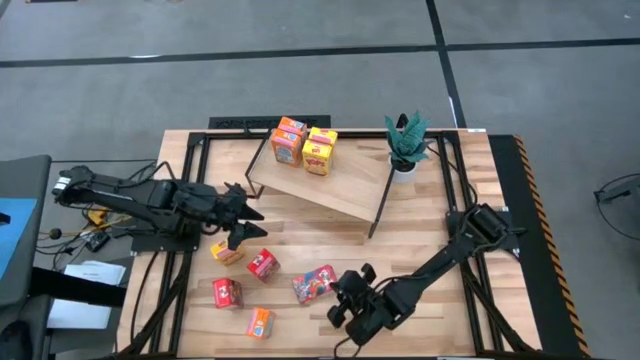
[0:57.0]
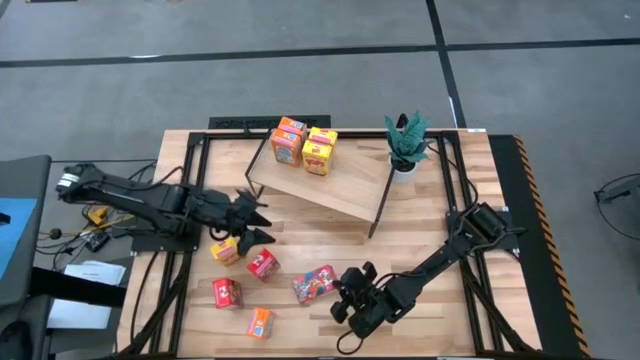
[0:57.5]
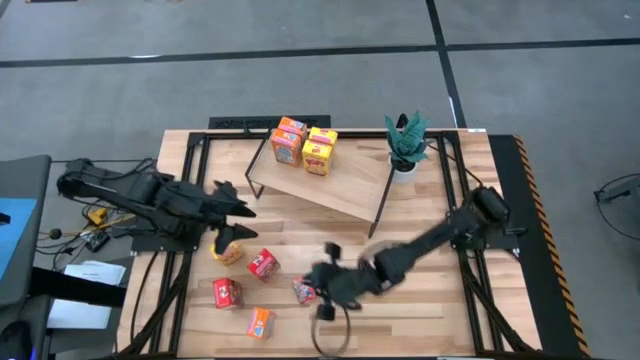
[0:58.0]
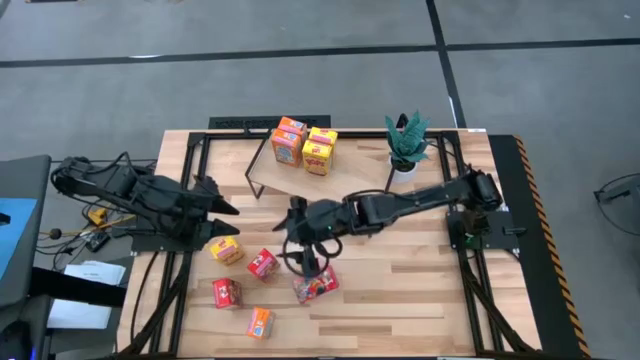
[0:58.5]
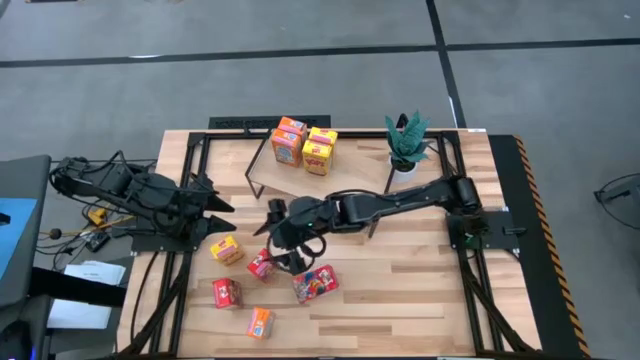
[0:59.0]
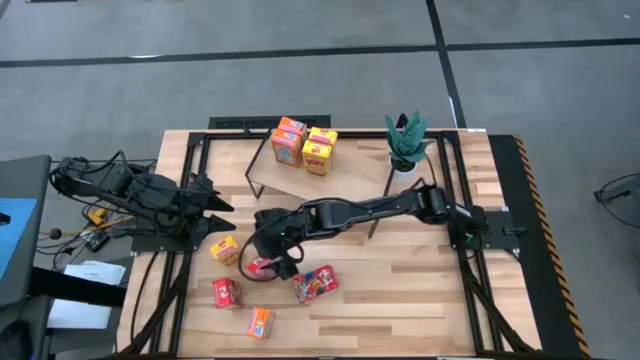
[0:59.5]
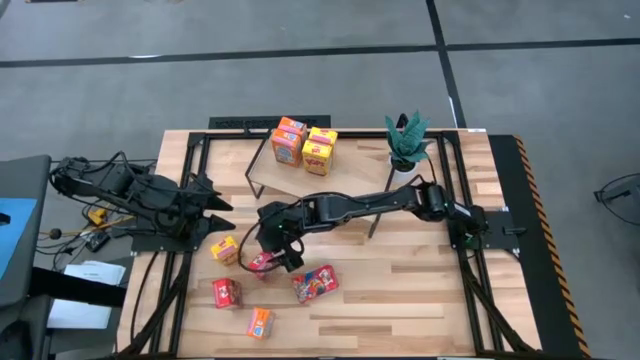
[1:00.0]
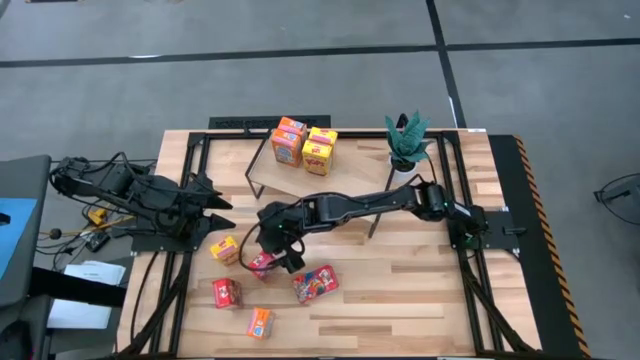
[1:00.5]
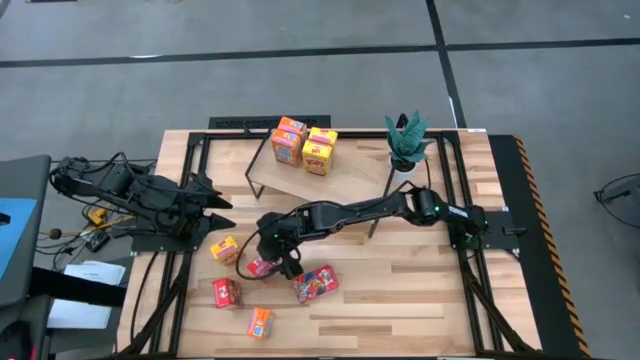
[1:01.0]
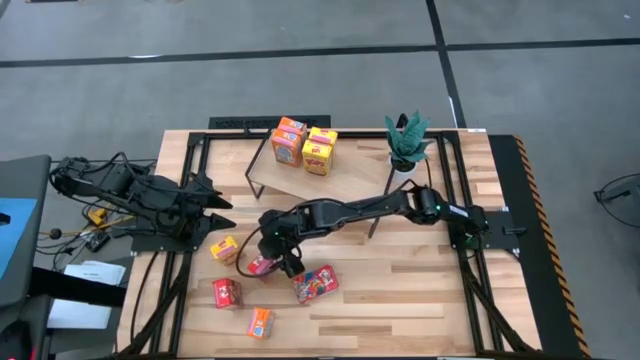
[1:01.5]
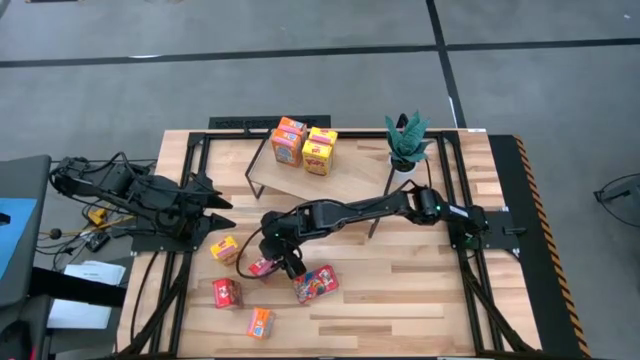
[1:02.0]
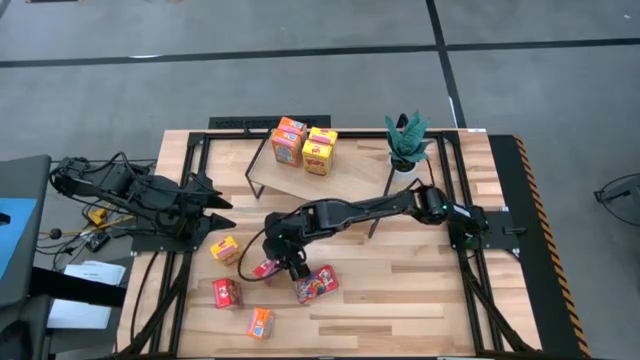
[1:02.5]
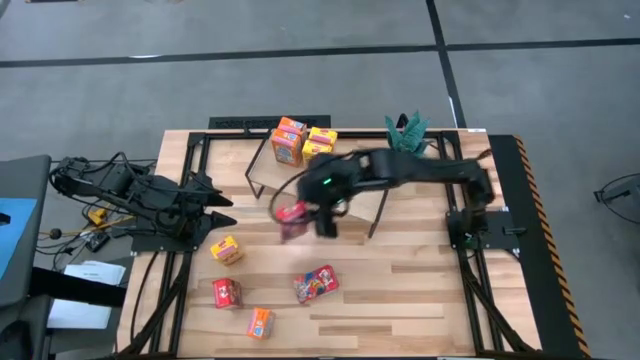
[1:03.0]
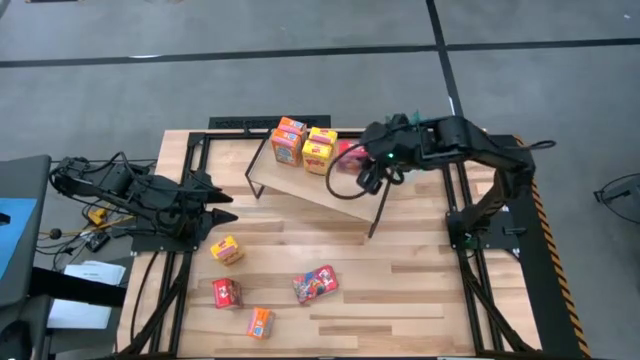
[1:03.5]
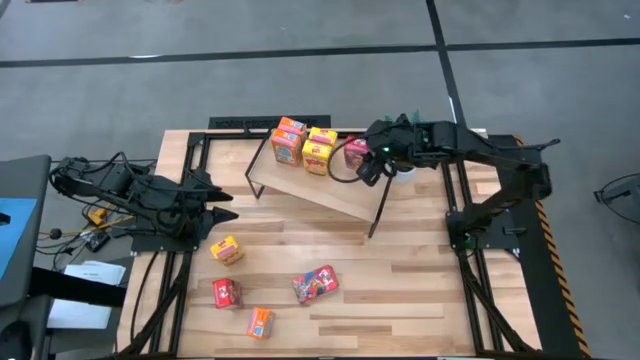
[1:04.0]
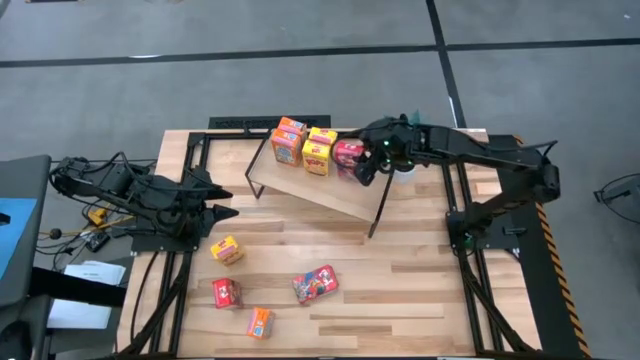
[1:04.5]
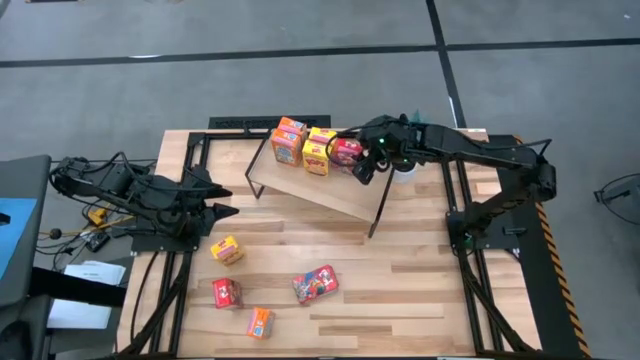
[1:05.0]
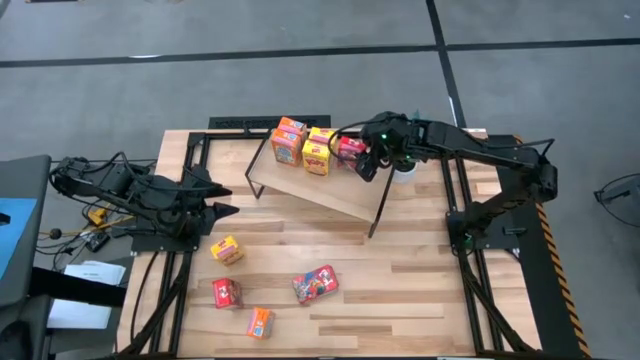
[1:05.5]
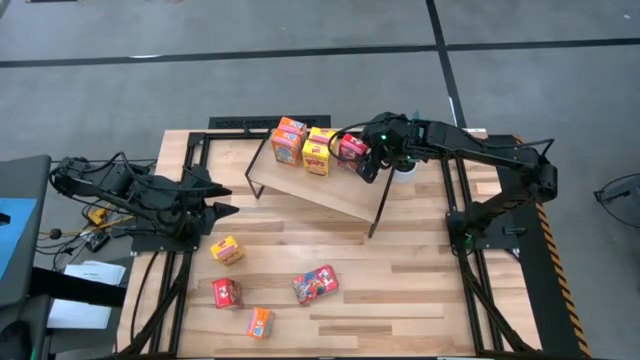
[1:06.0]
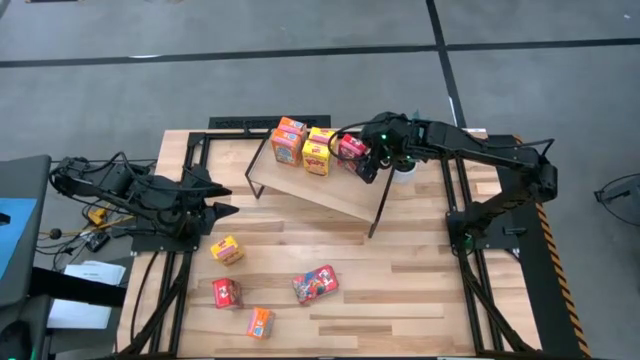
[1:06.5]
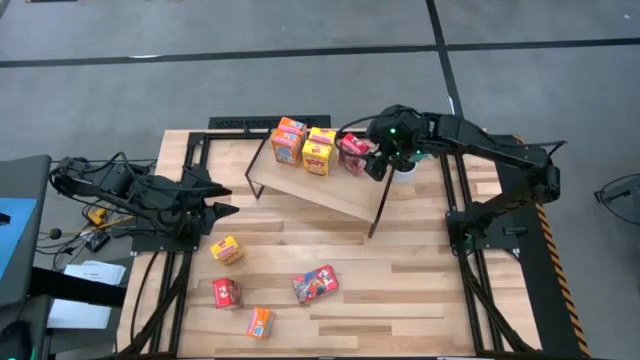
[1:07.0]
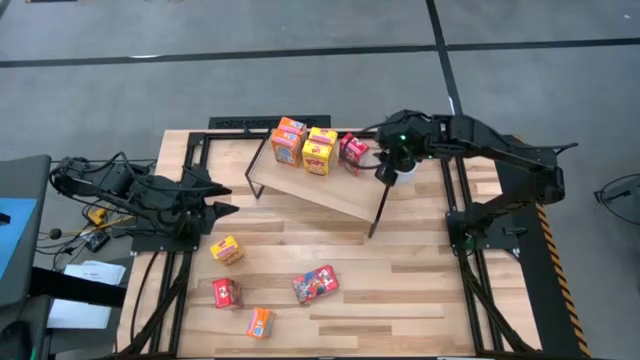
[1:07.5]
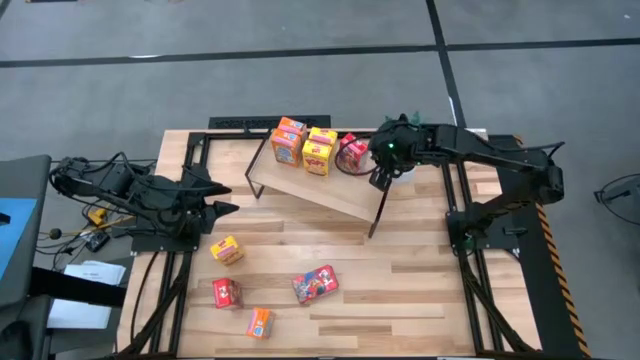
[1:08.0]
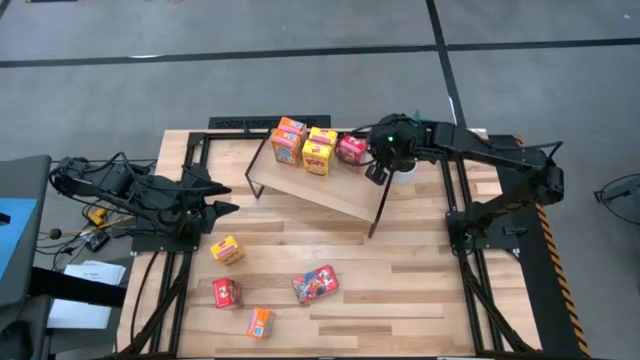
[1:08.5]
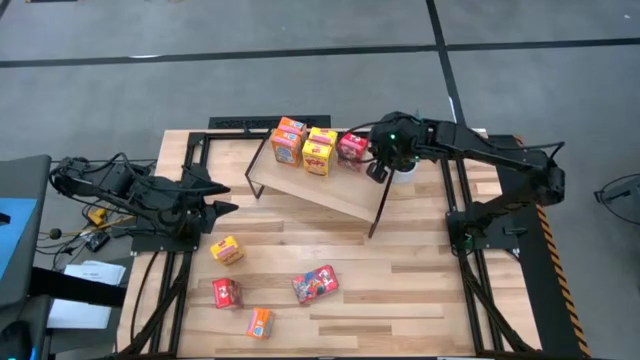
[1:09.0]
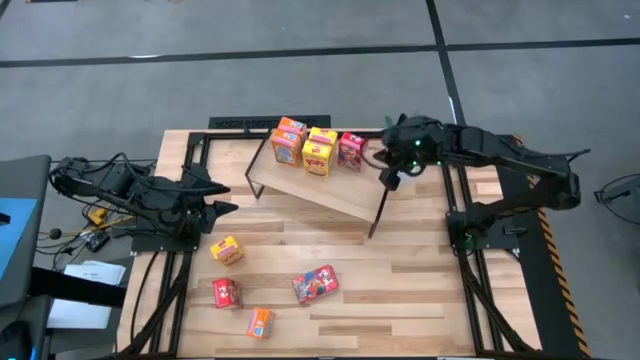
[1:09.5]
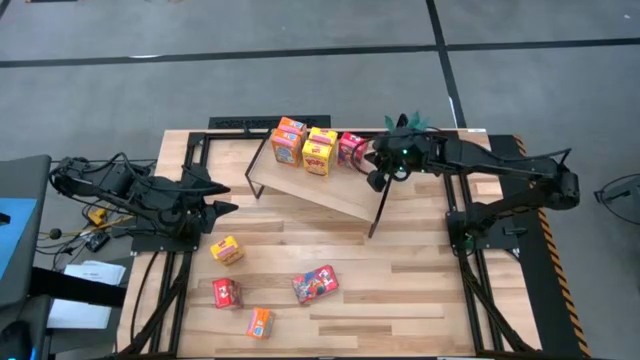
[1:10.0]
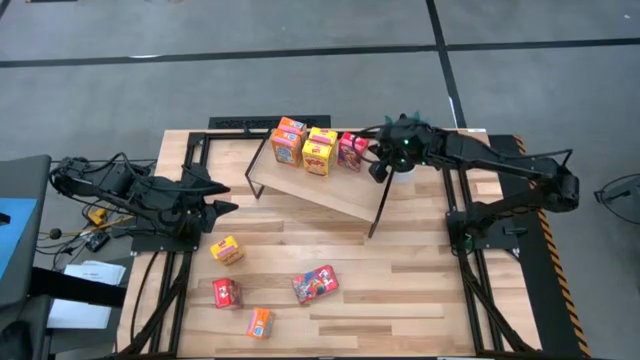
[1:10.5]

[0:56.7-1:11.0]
Task: Stack cereal on shelf
Put the middle red cereal box on the shelf

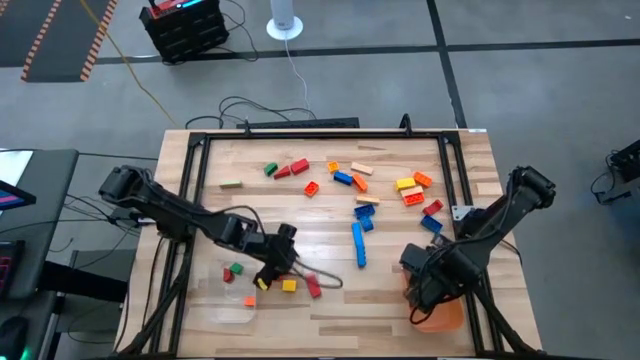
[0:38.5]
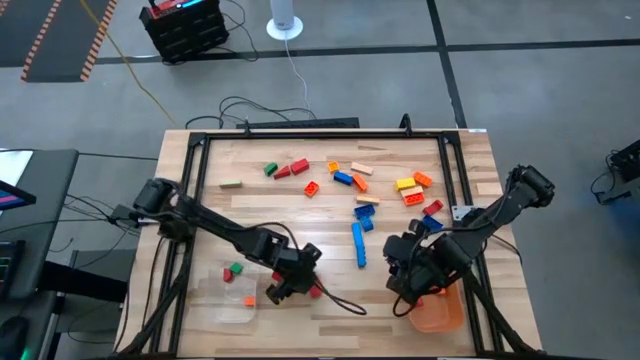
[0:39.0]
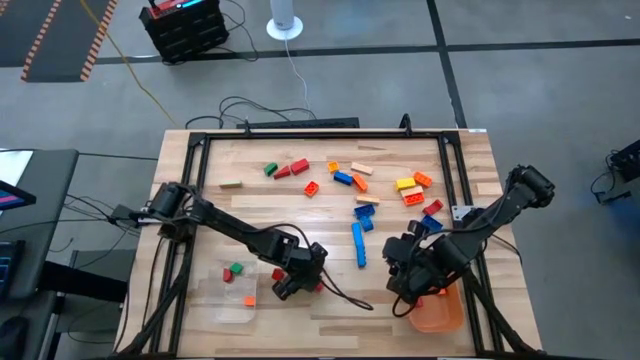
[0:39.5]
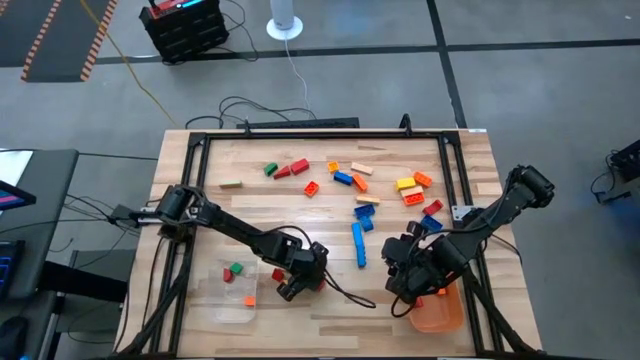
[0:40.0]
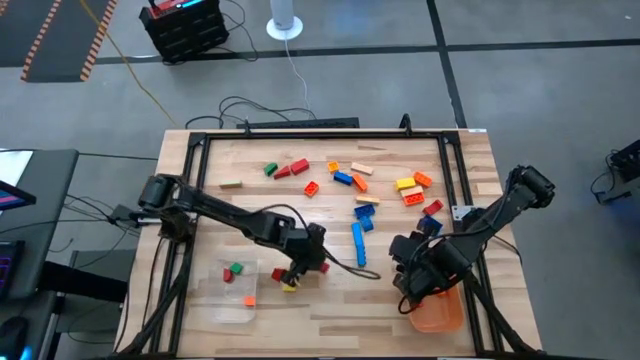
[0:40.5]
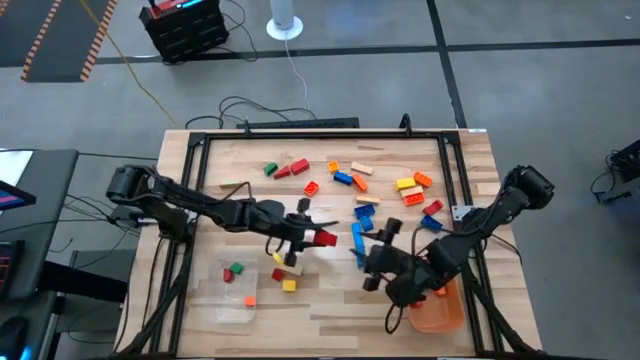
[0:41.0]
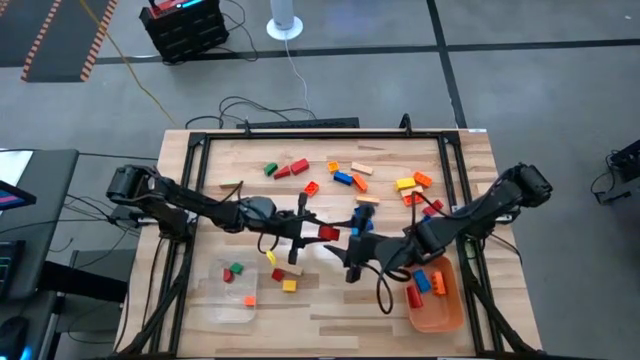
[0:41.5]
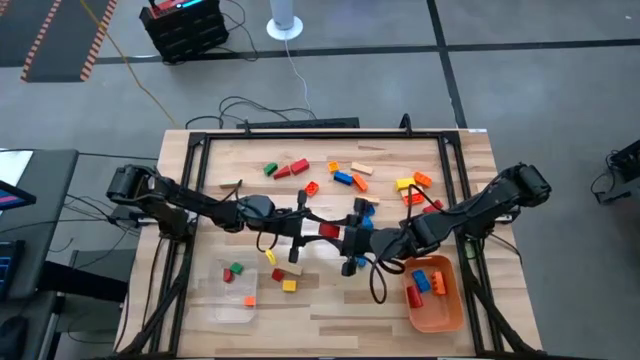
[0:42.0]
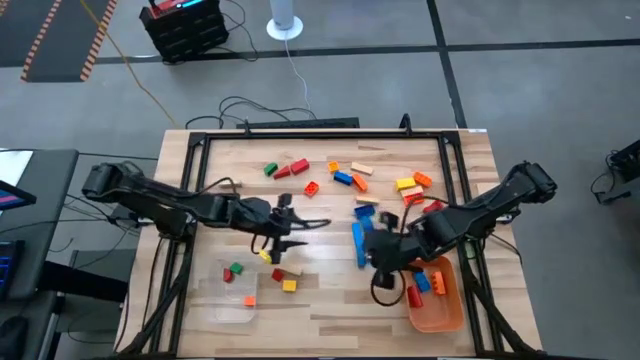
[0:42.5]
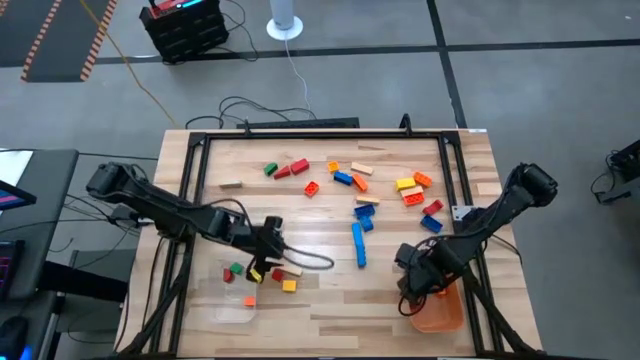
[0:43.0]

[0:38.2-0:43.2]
Task: Sort blocks by size
Put the large red block into the orange bin

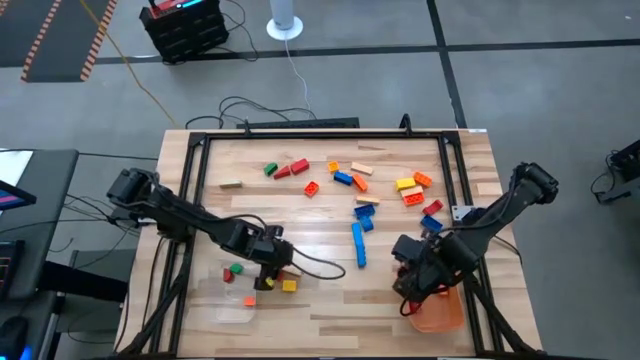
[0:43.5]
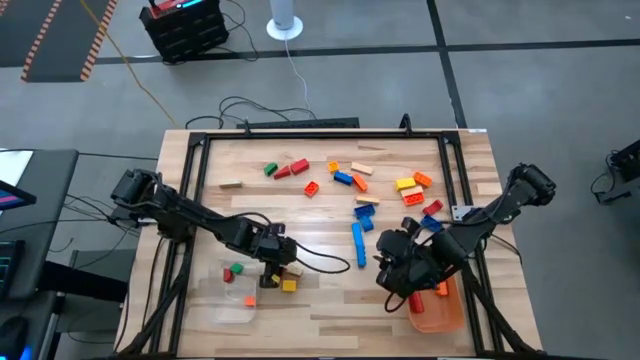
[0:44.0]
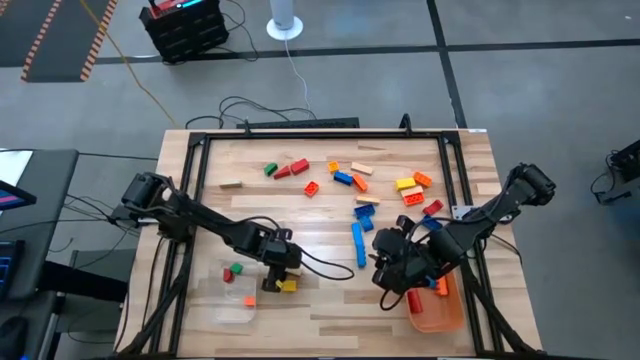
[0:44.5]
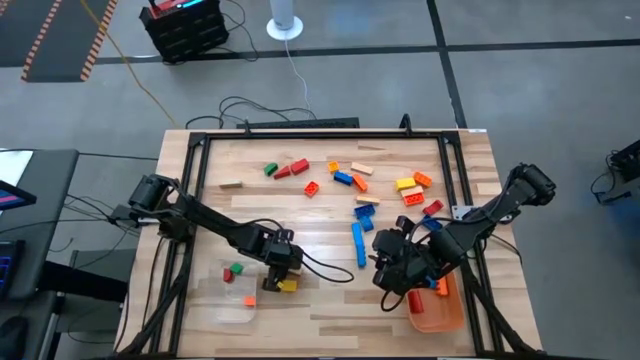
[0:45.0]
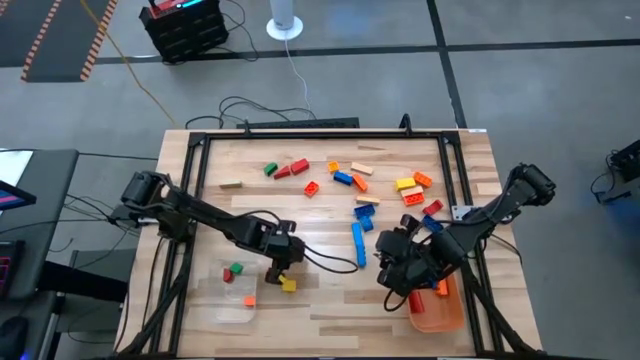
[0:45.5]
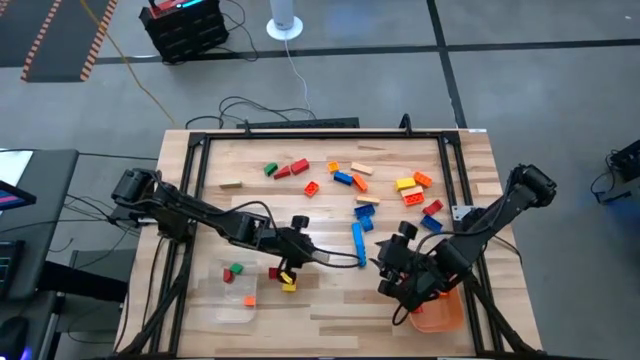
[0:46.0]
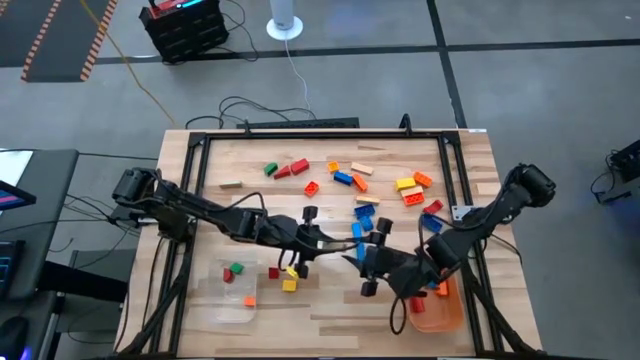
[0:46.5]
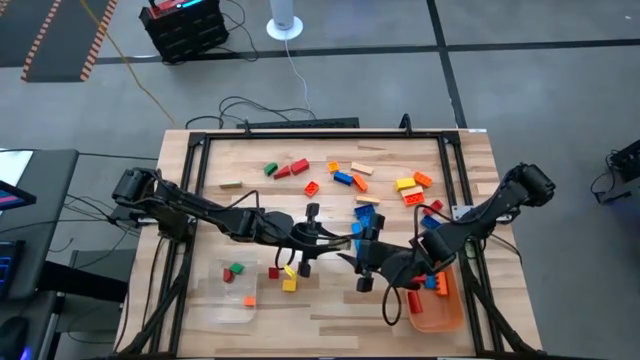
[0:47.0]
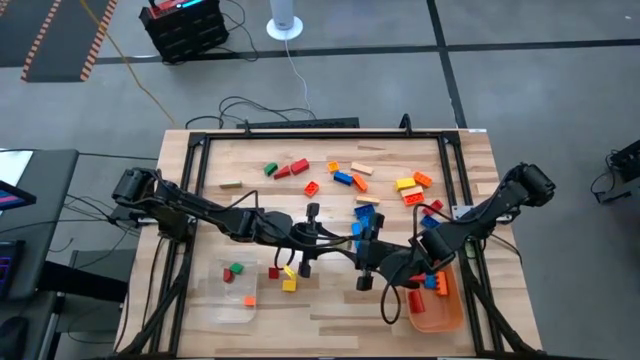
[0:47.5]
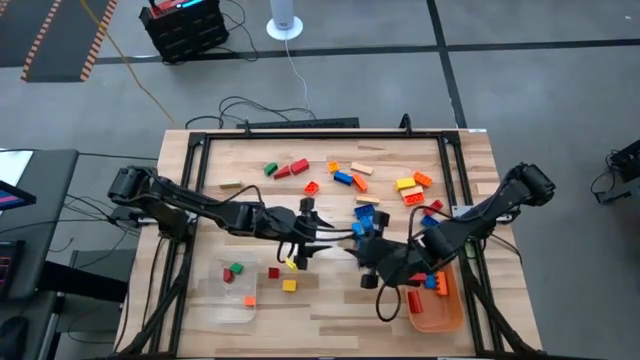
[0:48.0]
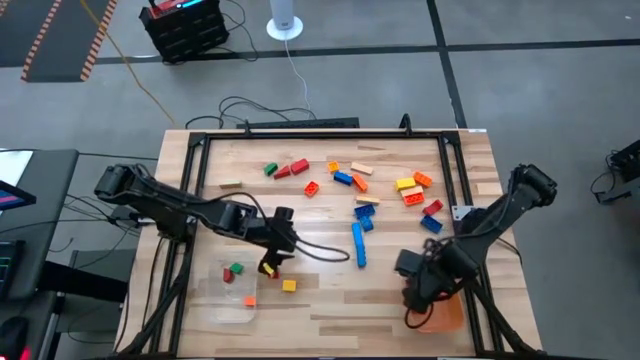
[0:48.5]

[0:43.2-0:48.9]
Put the large brown block into the orange bin
